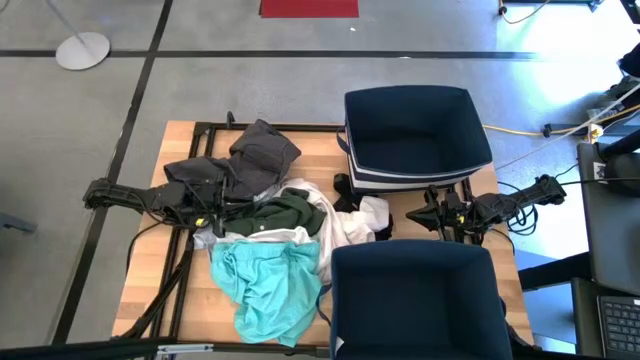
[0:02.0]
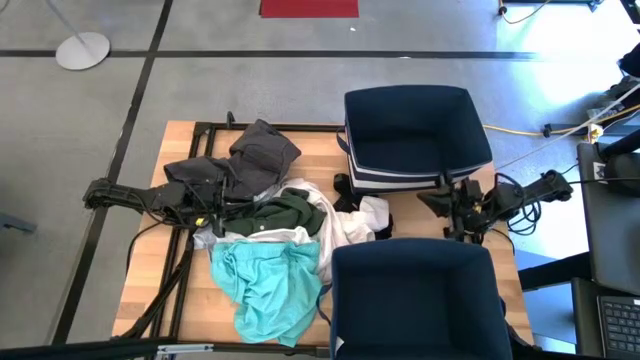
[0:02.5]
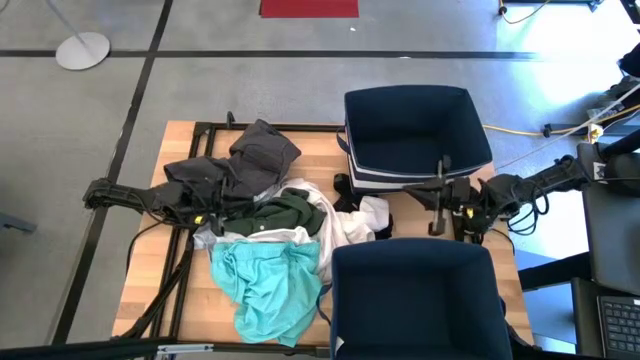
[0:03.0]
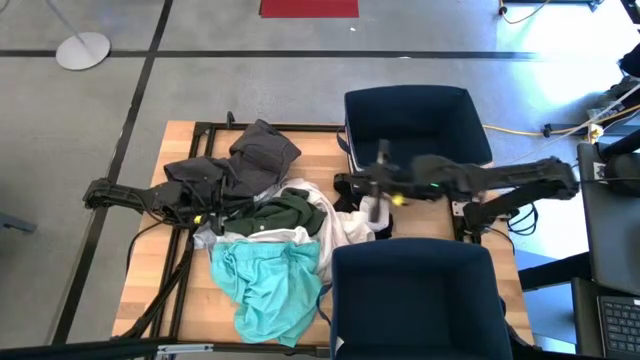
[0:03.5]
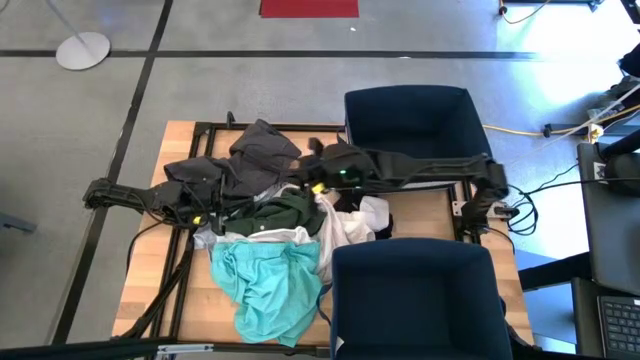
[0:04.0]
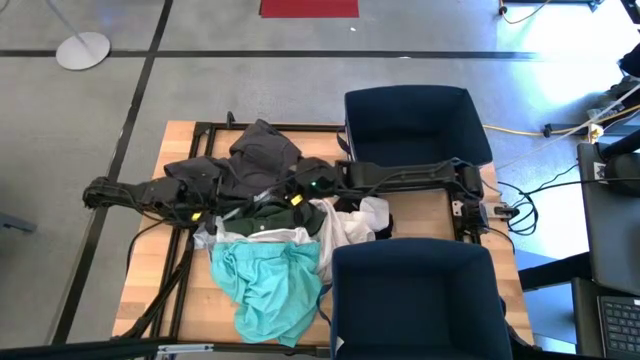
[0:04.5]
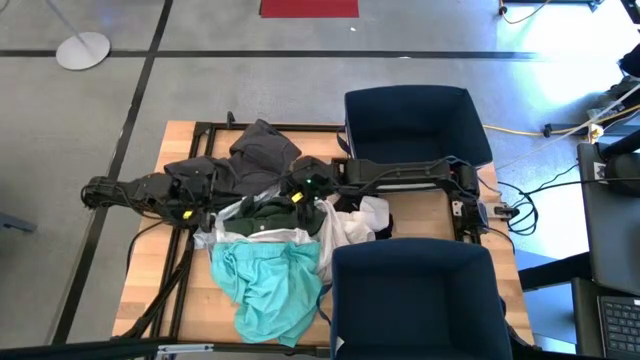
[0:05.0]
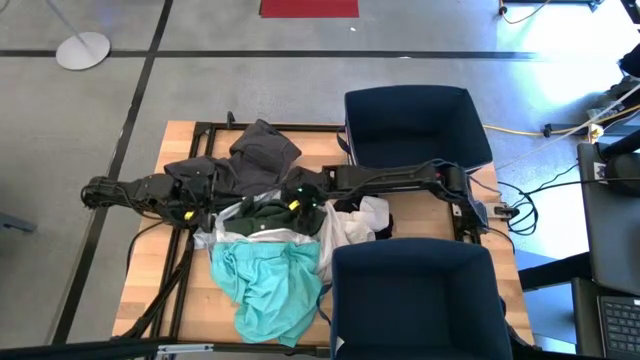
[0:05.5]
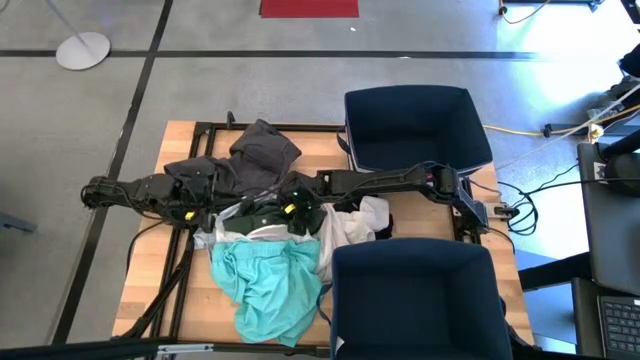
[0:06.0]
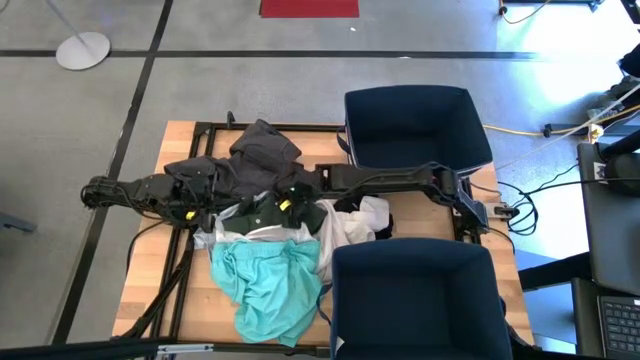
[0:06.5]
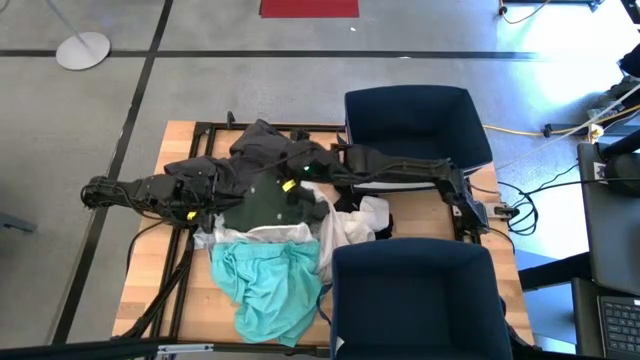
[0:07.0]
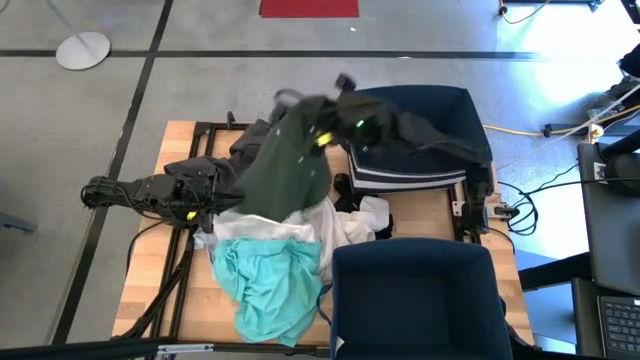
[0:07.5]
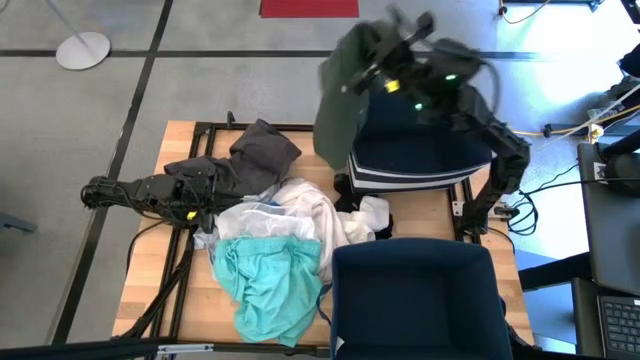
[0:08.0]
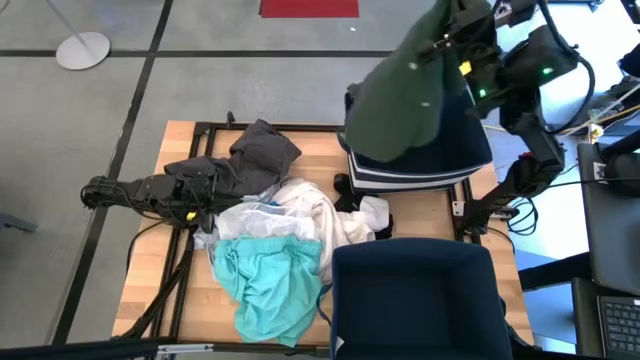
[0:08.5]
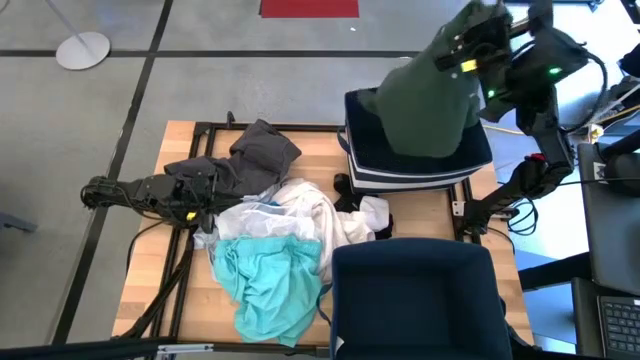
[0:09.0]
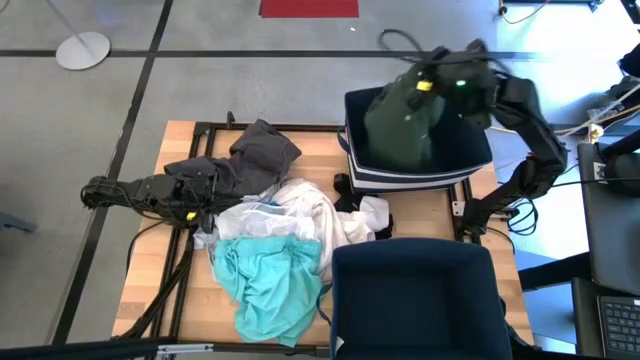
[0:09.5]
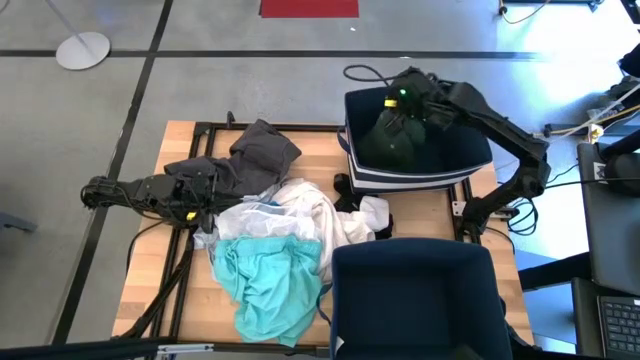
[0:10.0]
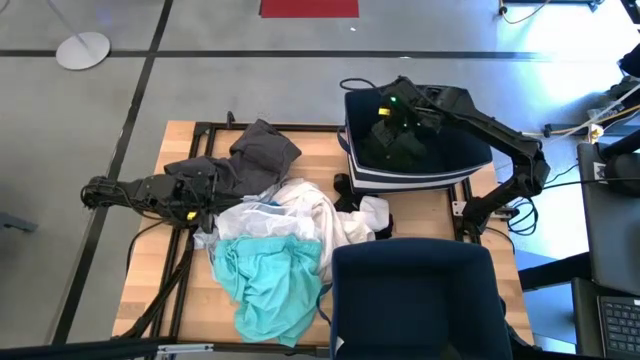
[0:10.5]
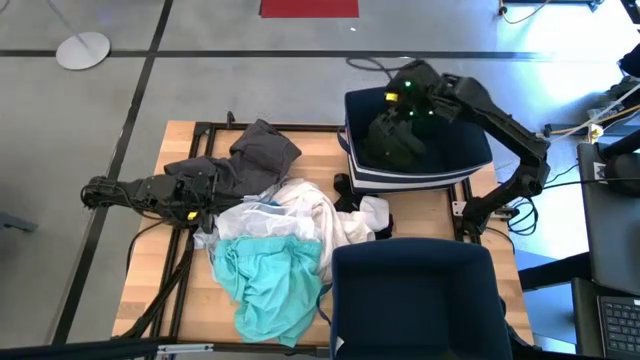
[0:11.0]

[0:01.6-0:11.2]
Task: Sort clothes
Put the dark green shirt into the top laundry bin

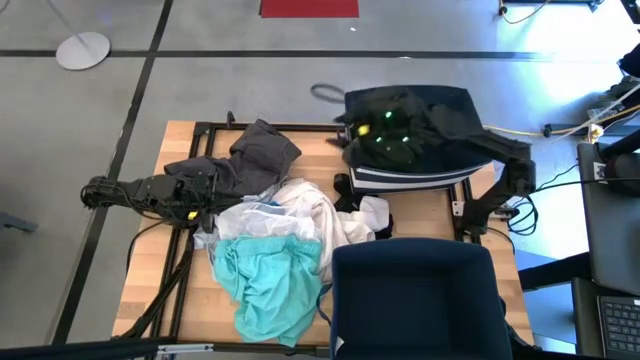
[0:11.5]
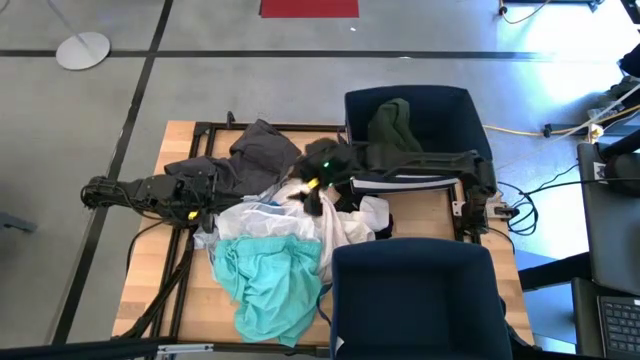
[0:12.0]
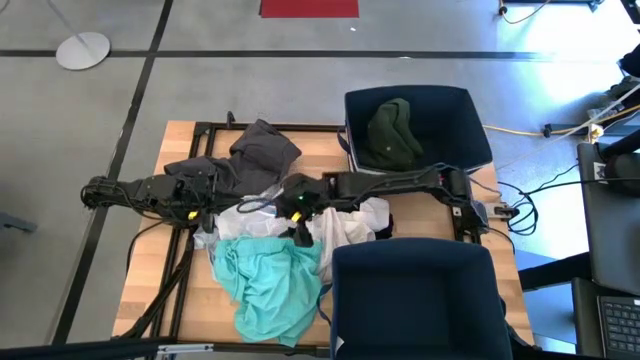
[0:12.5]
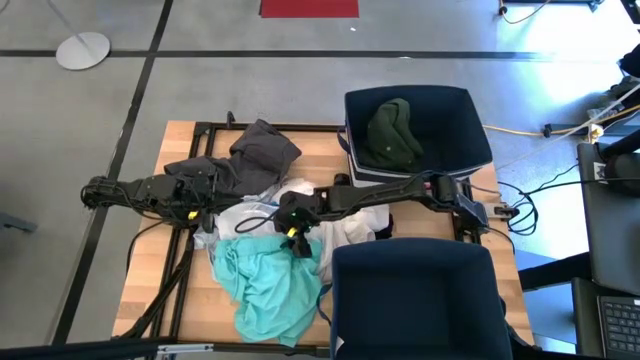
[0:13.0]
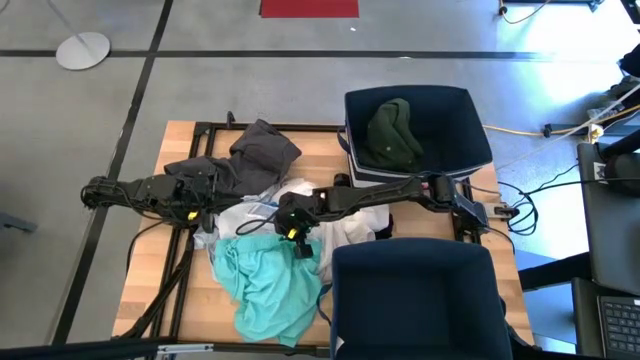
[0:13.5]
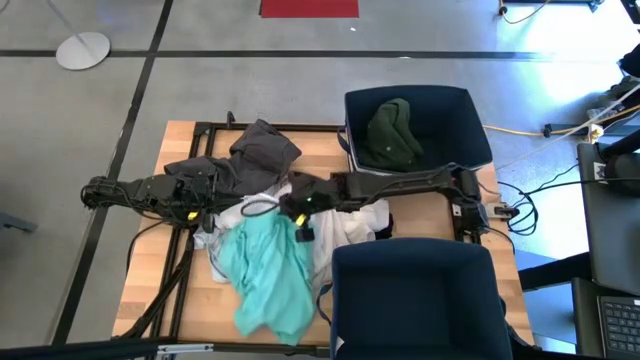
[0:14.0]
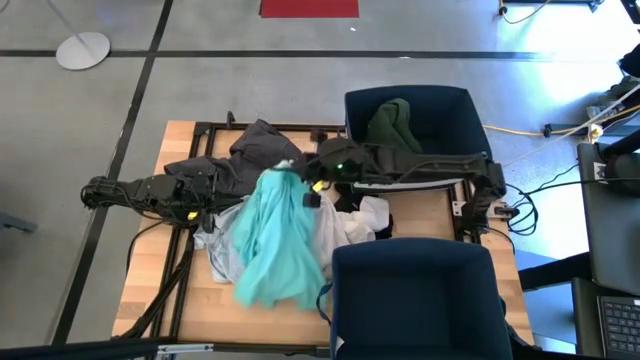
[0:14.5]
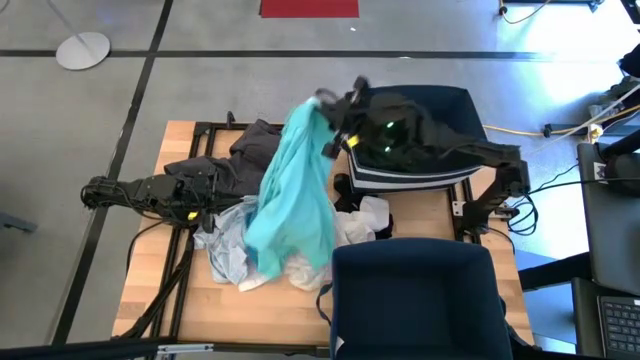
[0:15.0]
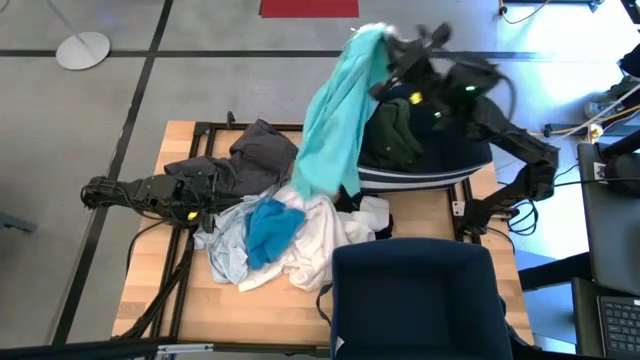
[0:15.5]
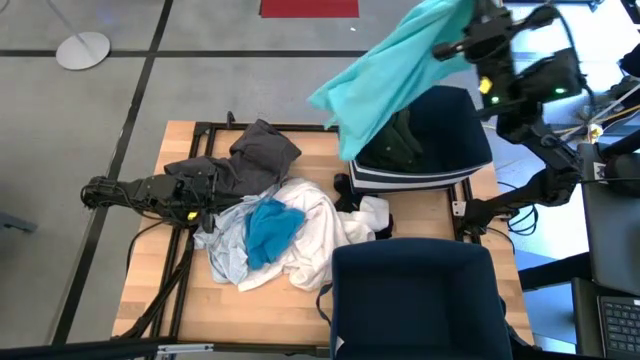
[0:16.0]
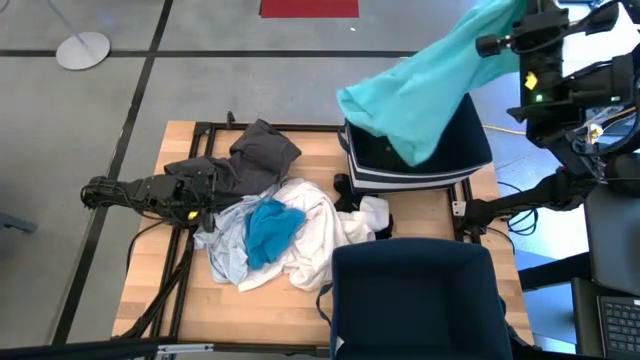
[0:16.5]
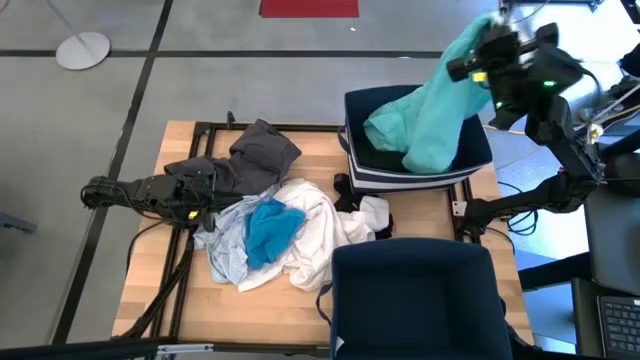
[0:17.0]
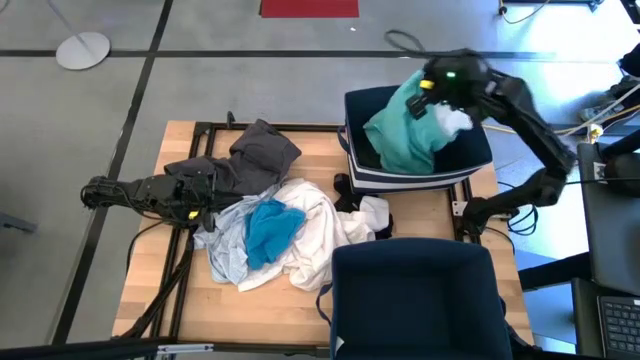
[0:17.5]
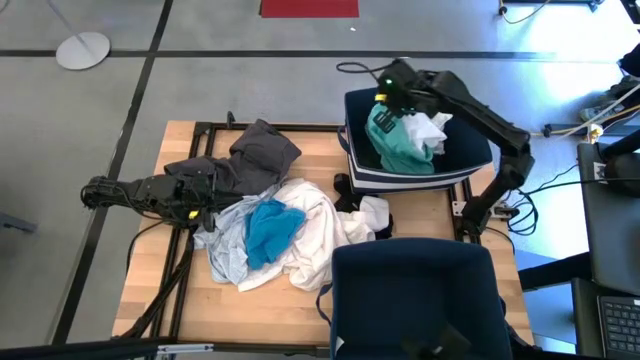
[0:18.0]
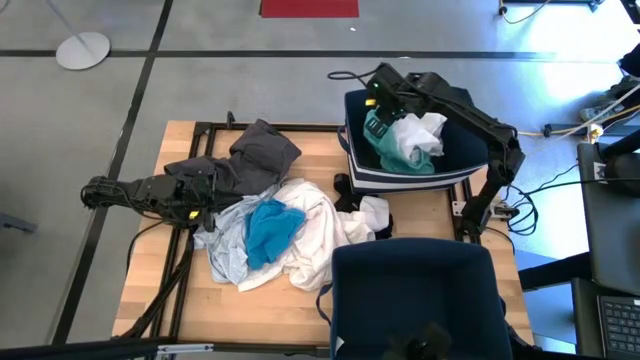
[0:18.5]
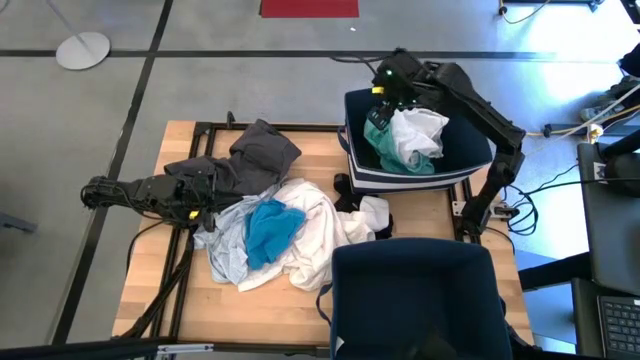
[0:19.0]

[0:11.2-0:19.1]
Put the light green shorts into the top laundry bin

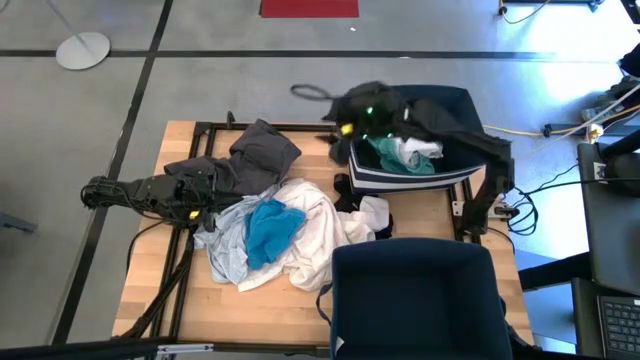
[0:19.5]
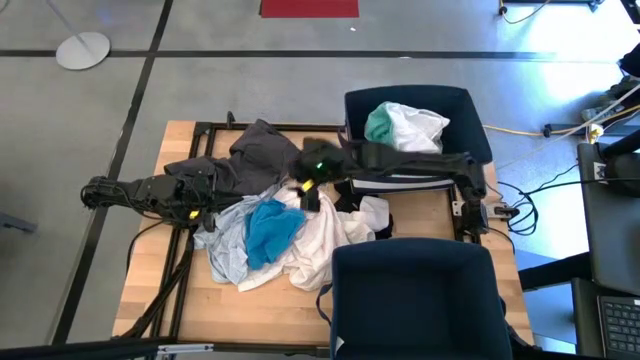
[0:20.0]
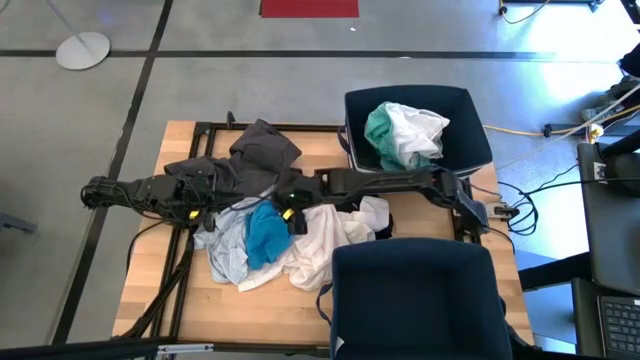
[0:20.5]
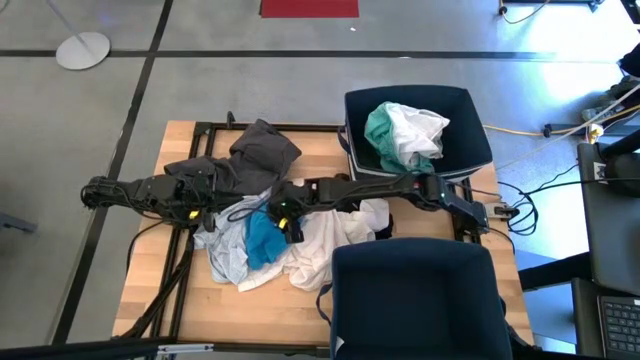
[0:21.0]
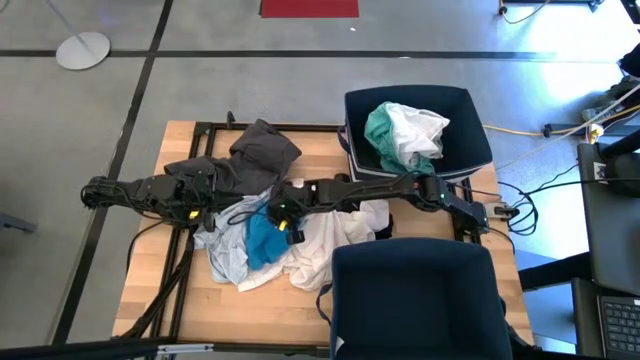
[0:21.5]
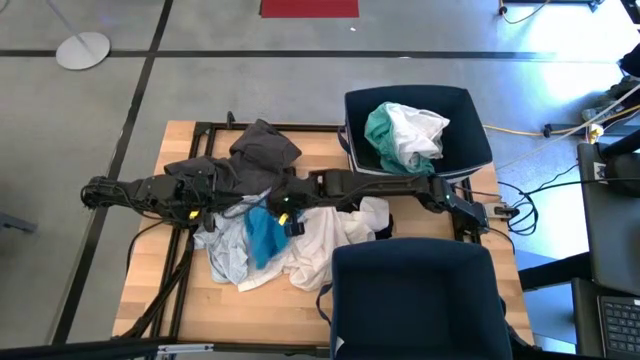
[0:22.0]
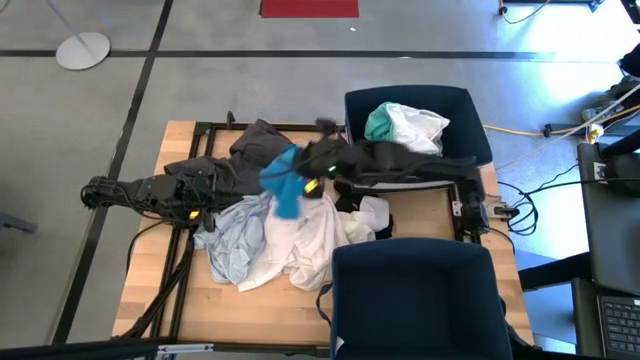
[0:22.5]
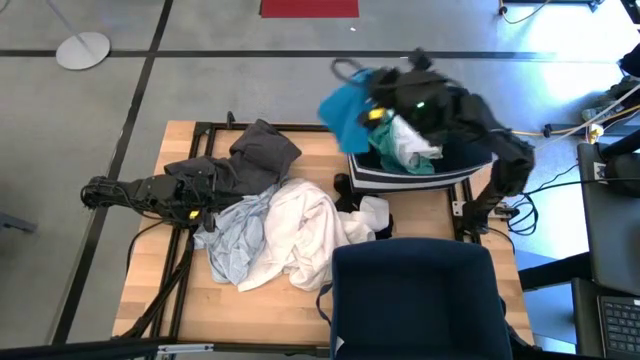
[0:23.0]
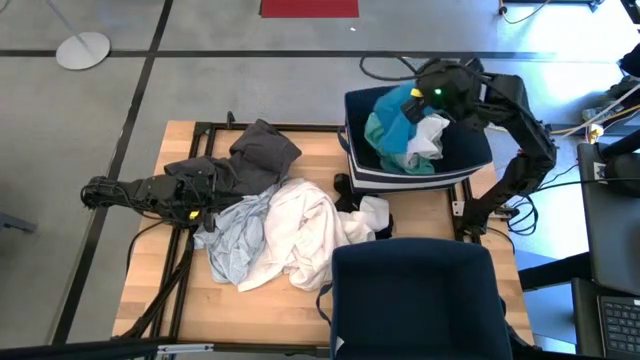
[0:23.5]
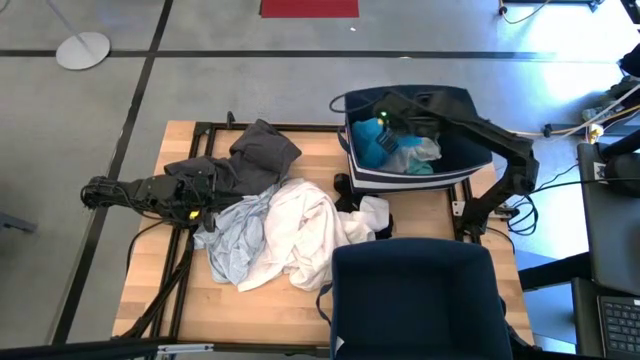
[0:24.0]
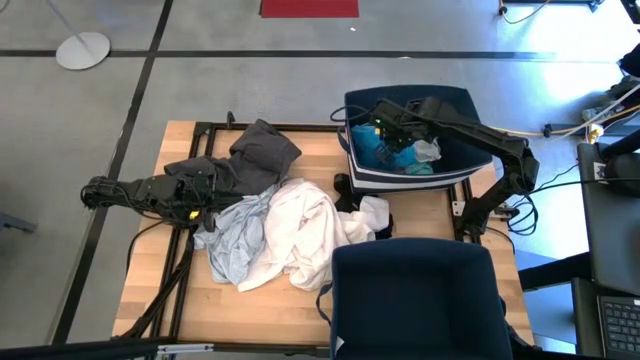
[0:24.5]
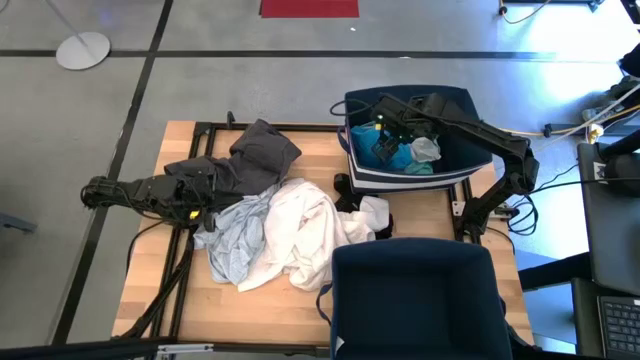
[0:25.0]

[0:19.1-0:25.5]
Put the blue shorts into the top laundry bin
